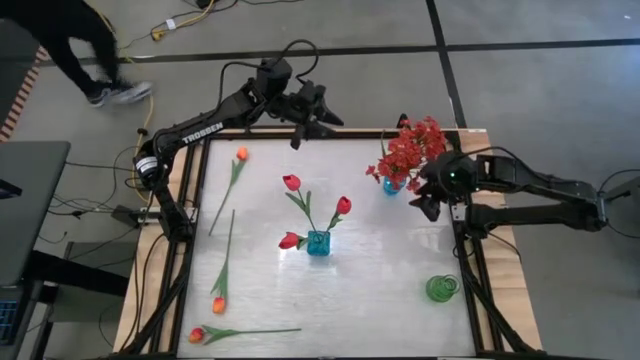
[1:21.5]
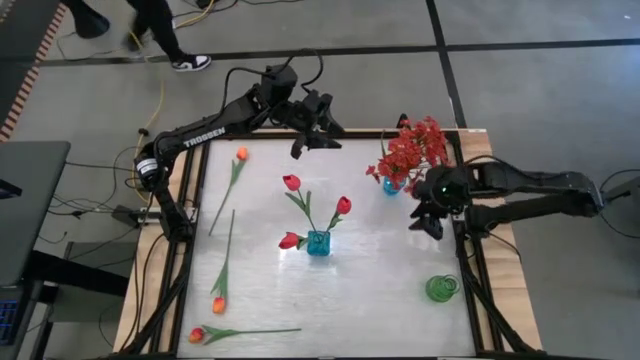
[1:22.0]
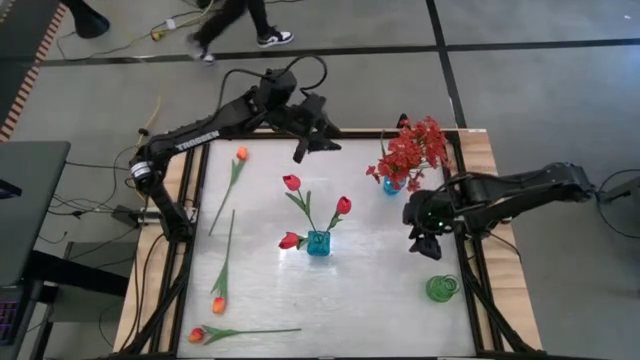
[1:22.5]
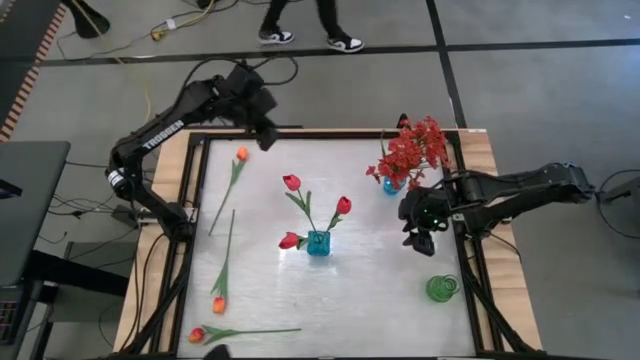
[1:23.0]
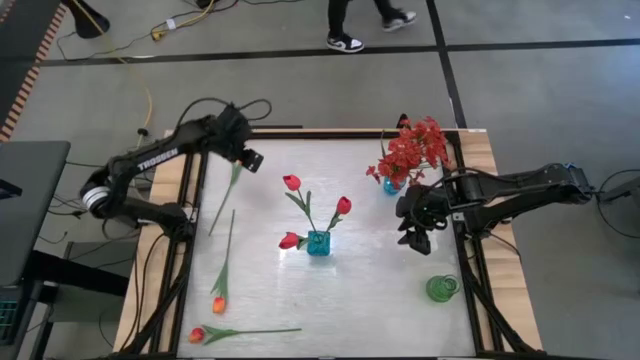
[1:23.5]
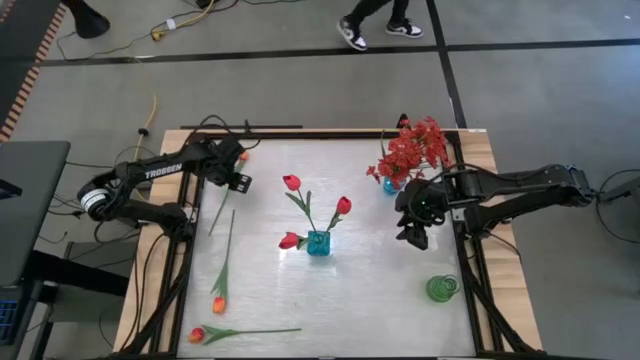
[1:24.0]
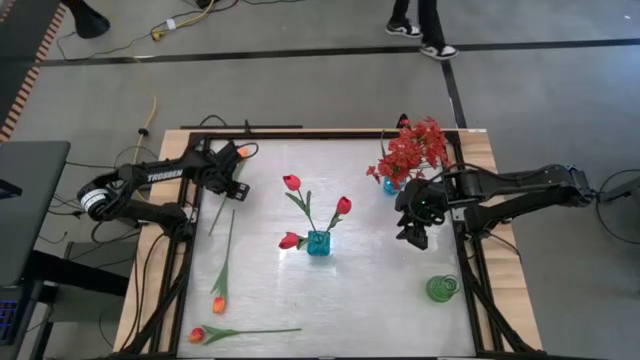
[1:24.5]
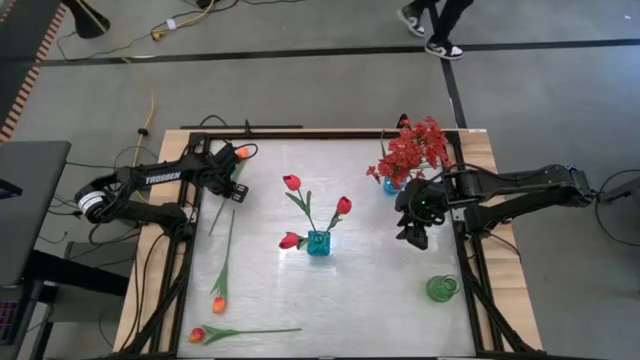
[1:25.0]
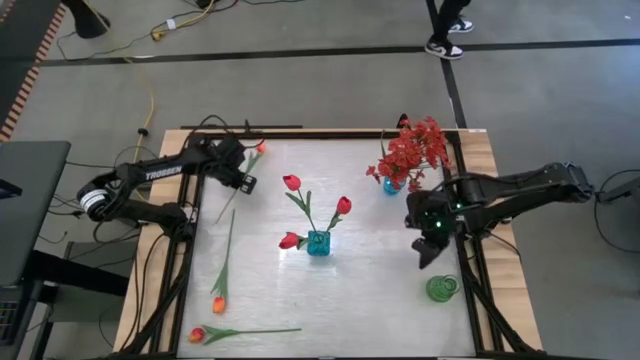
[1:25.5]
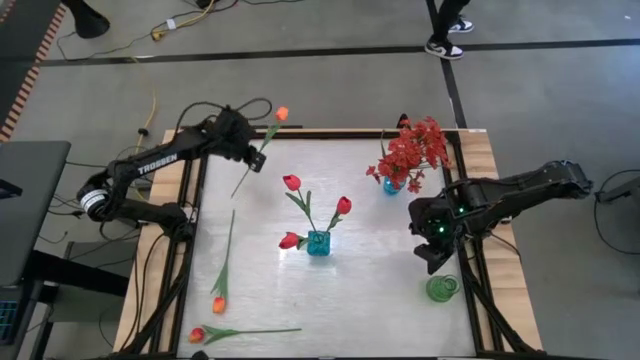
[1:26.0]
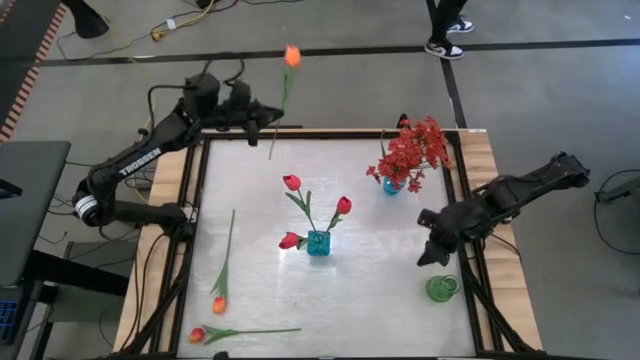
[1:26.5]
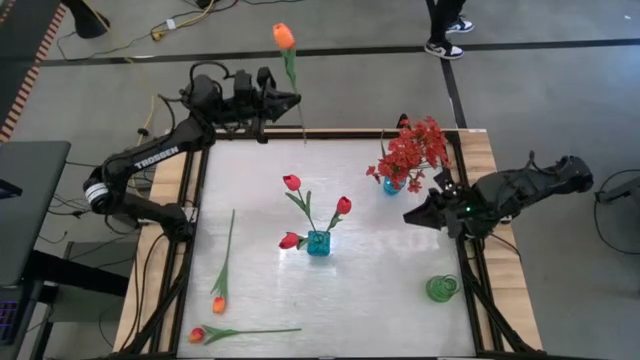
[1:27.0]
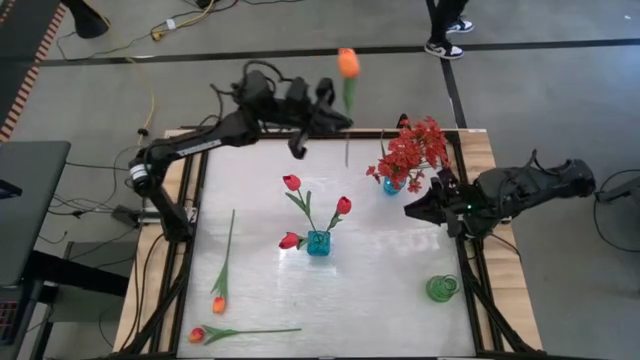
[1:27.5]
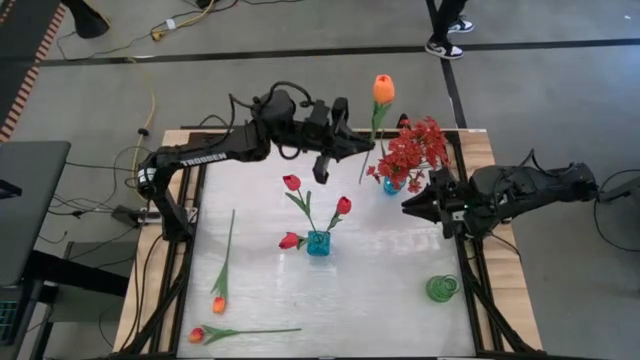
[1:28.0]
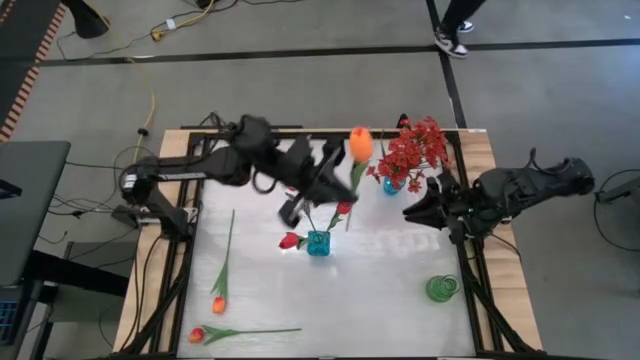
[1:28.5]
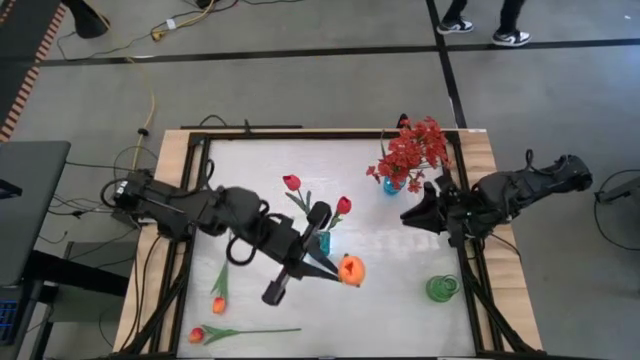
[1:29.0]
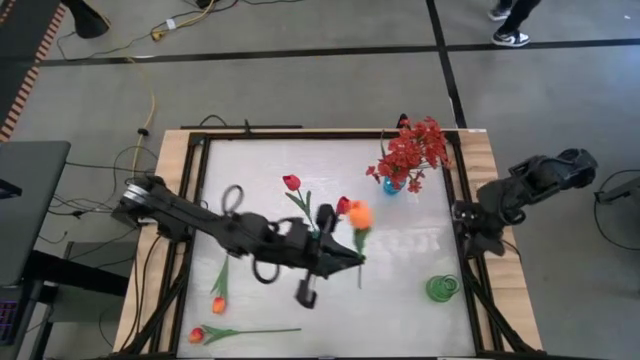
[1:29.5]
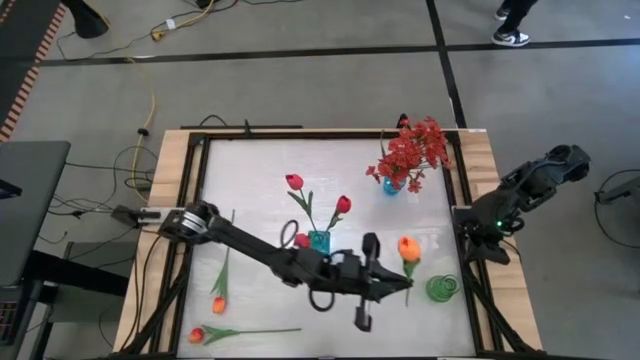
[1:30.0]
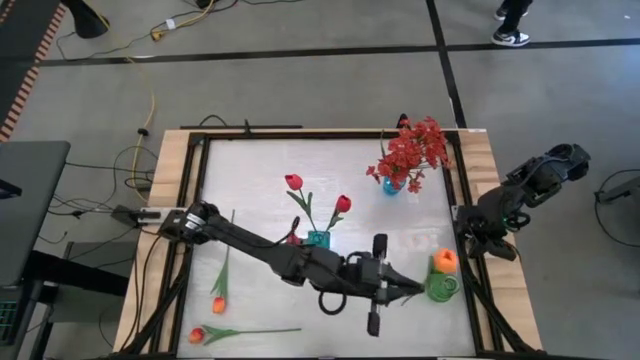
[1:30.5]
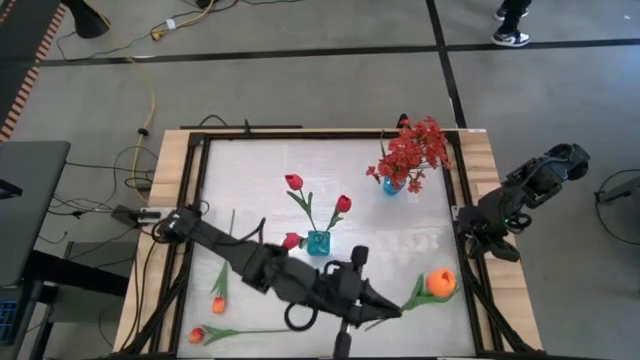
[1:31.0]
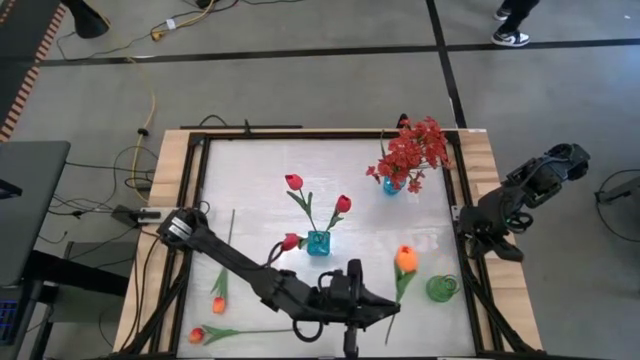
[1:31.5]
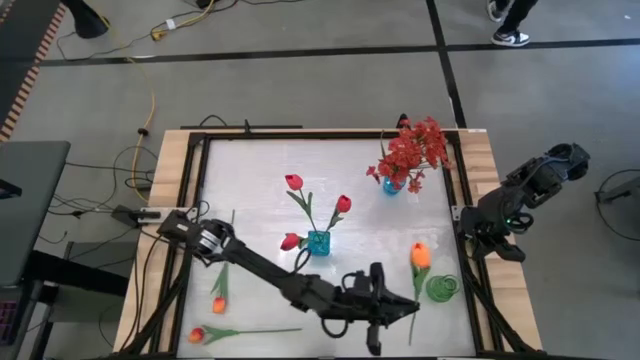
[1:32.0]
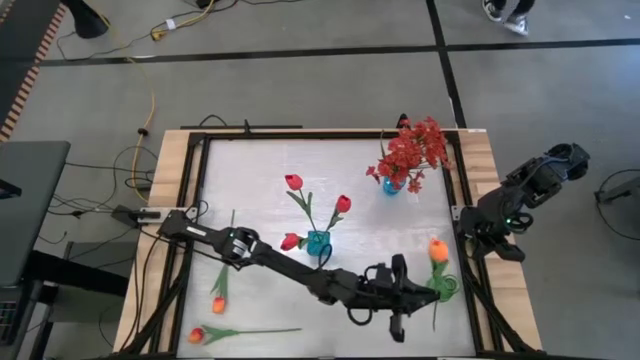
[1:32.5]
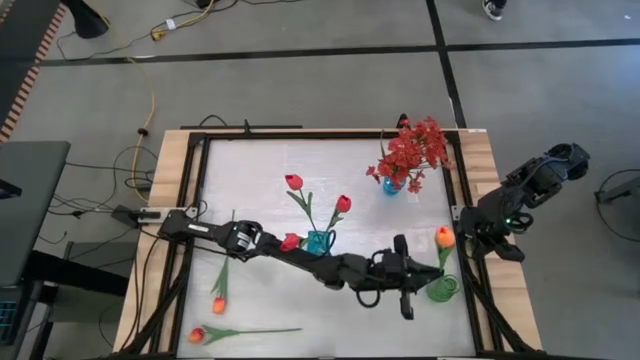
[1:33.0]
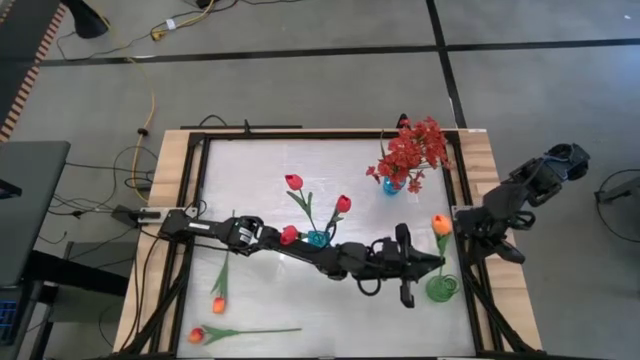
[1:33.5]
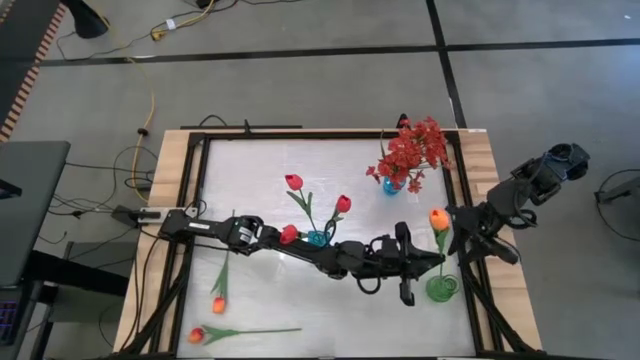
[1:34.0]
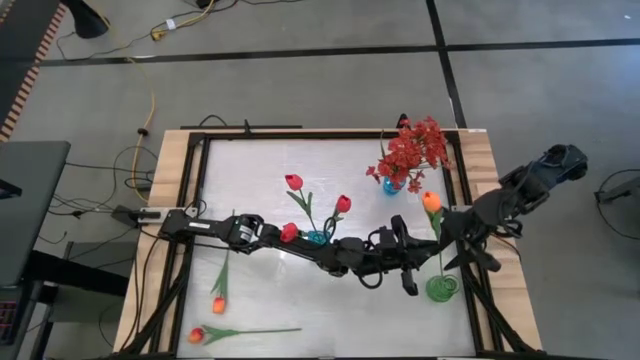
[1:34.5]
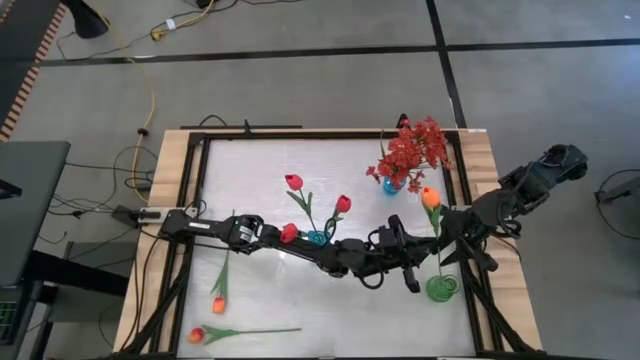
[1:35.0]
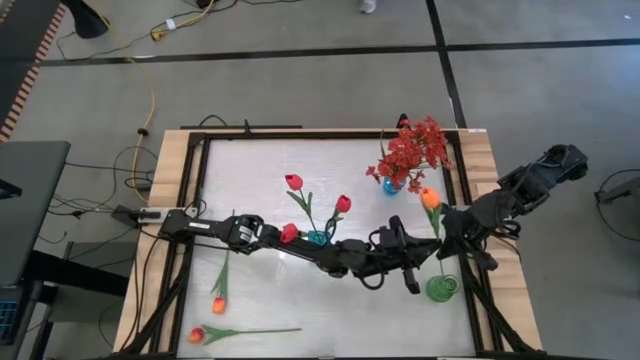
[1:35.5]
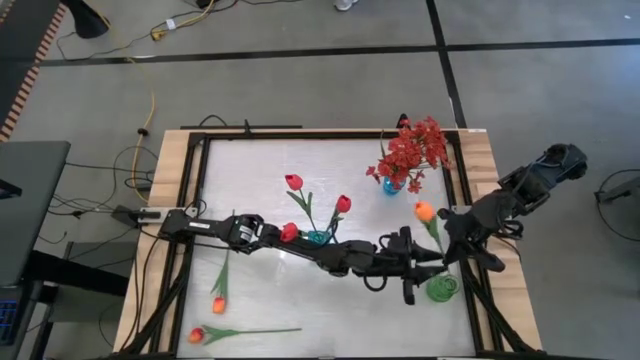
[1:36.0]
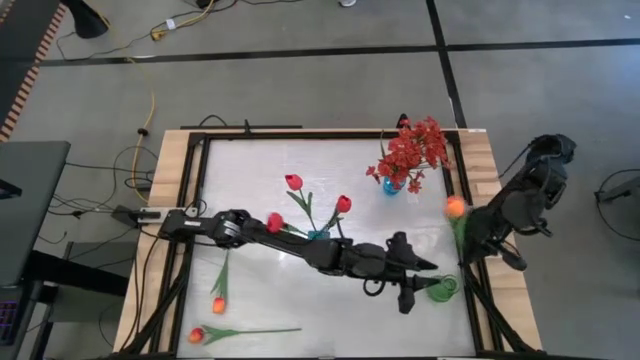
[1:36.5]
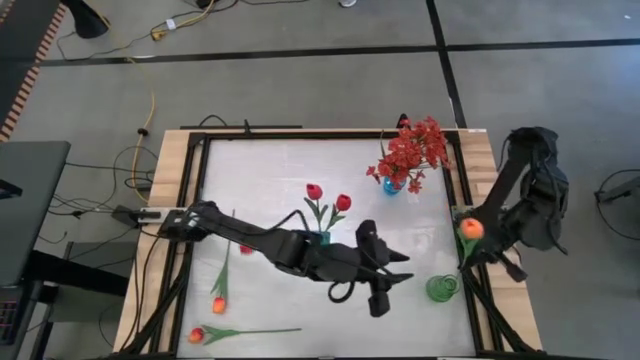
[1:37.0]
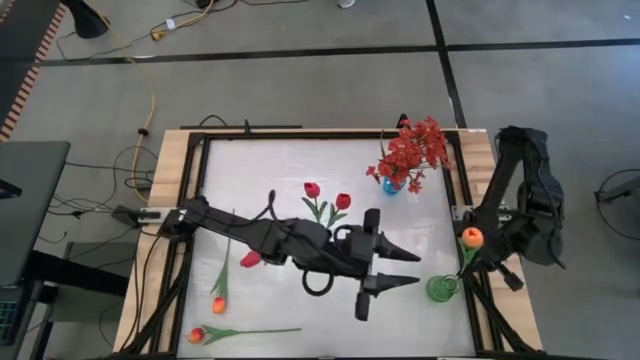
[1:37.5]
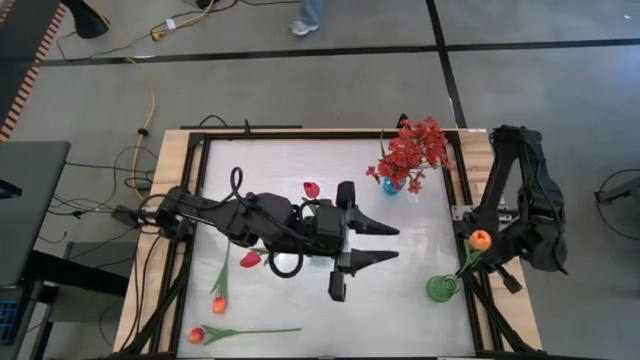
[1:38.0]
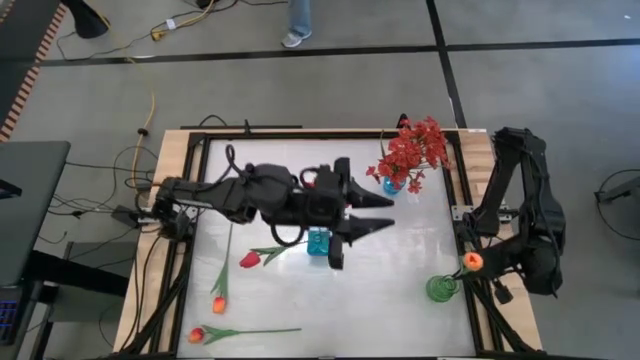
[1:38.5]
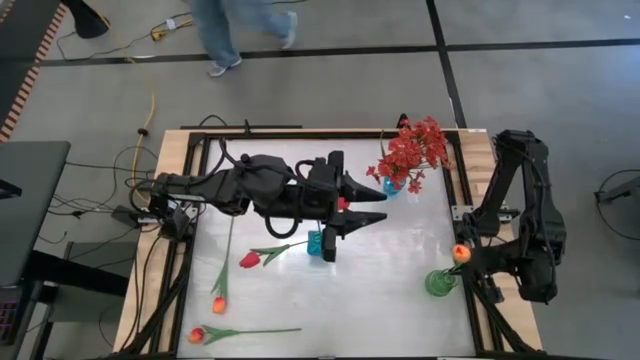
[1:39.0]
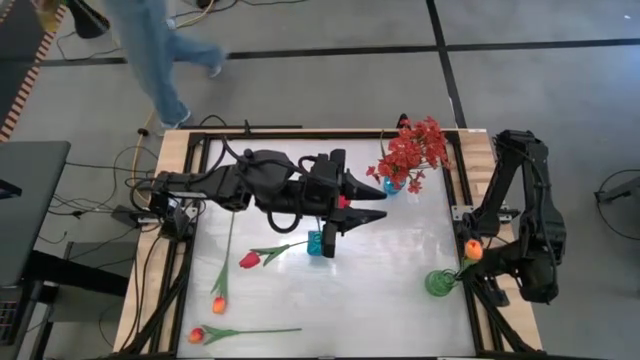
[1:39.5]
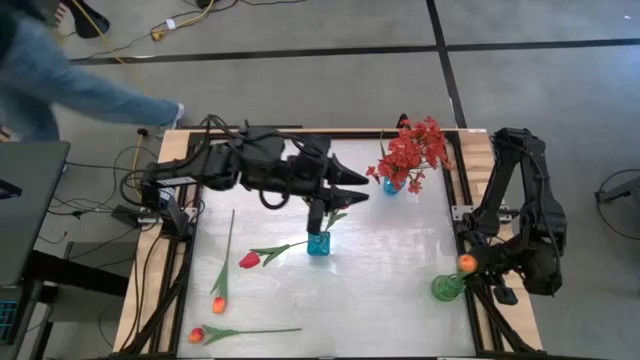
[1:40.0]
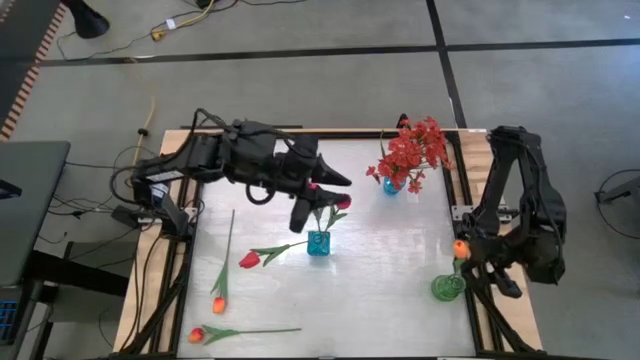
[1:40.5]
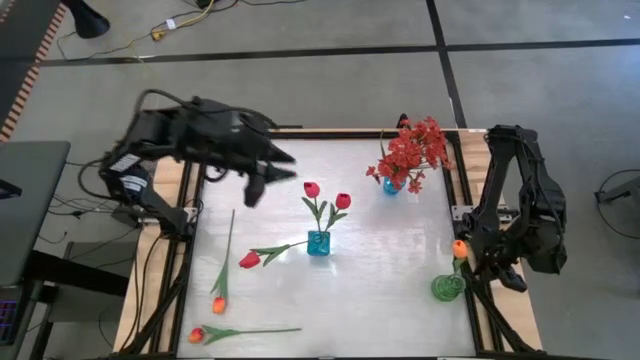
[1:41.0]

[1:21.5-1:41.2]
Task: Sort flowers into vase by color
Put the top orange flower into the green vase
